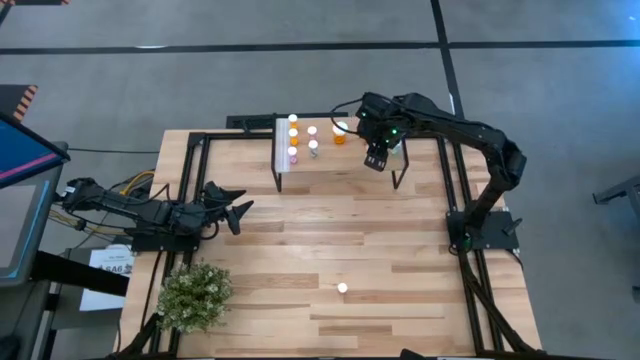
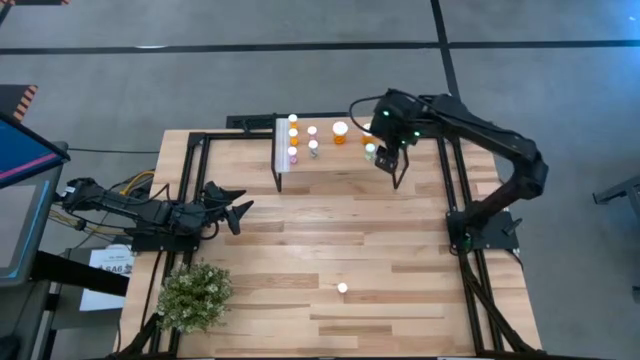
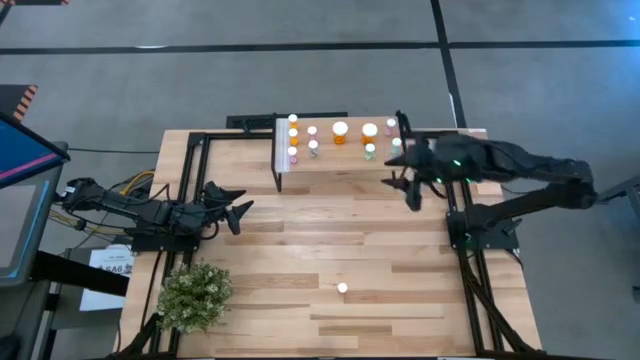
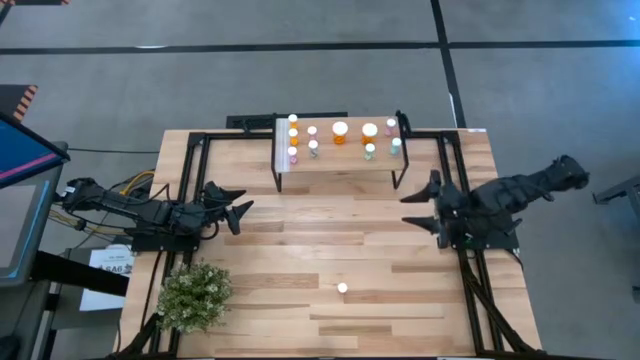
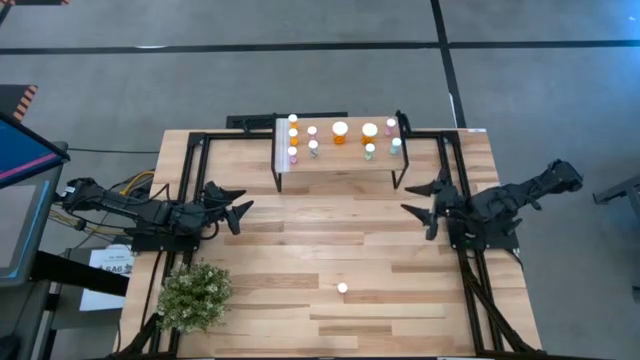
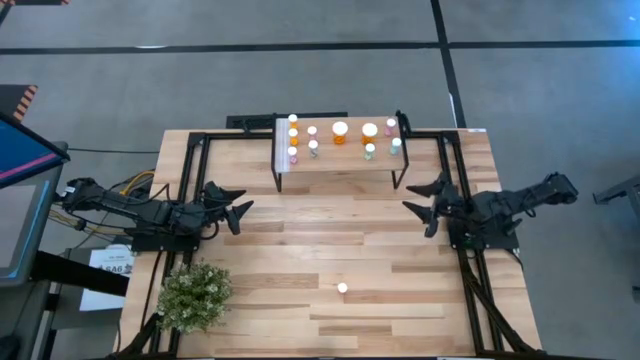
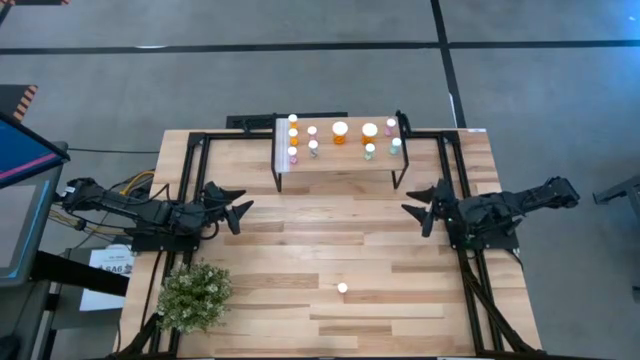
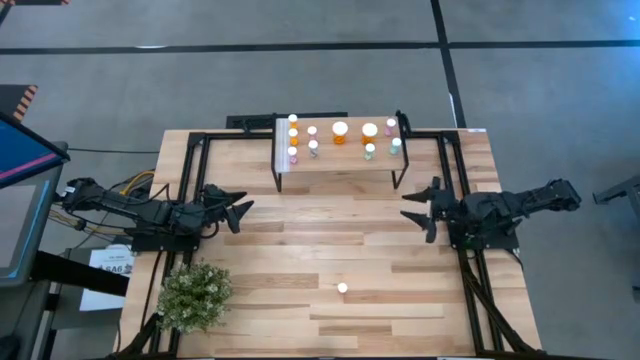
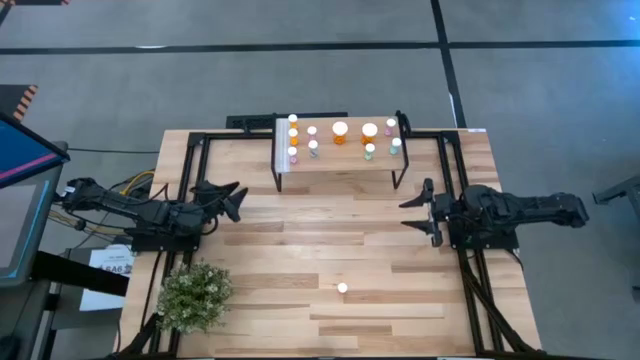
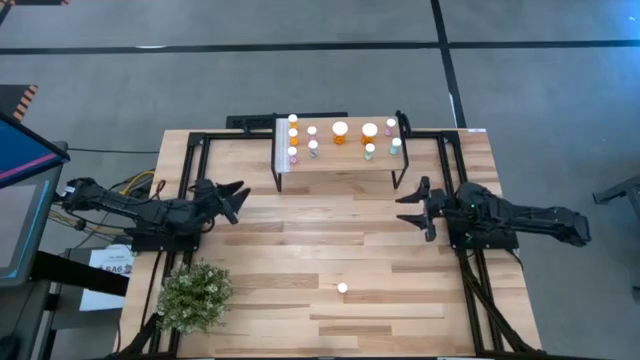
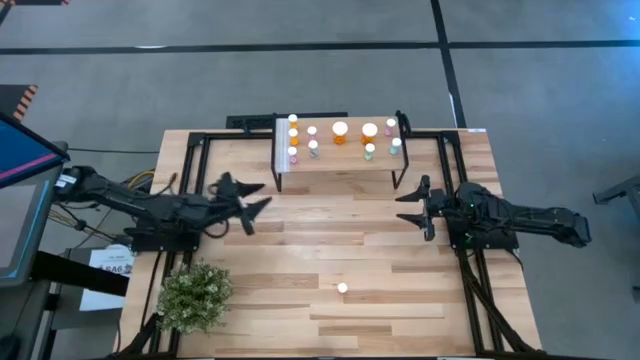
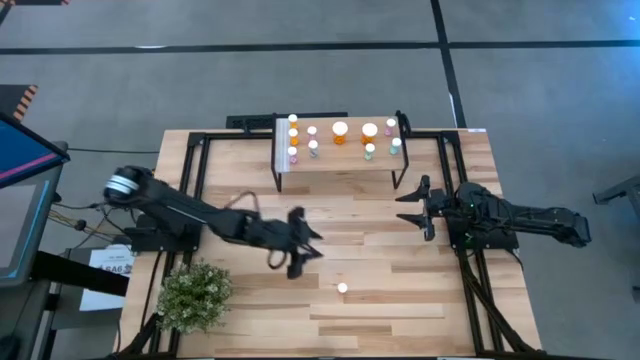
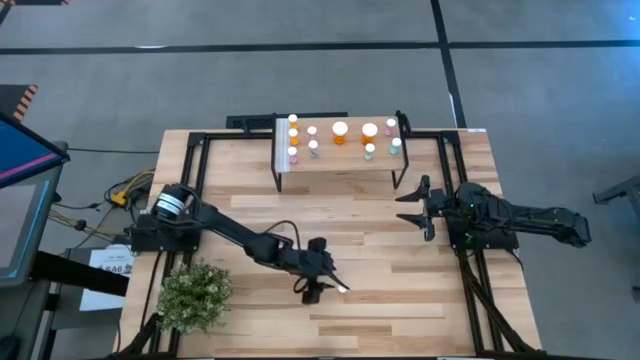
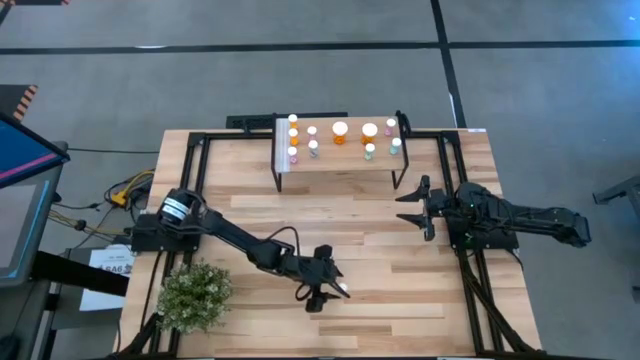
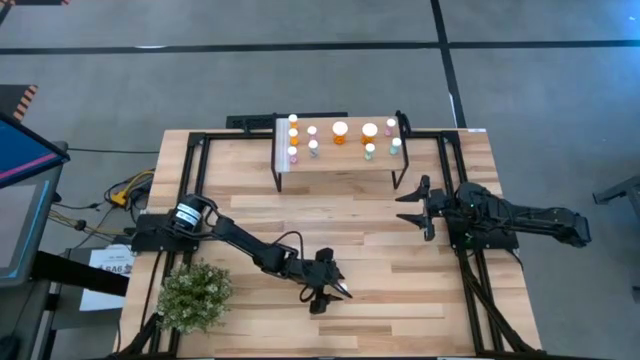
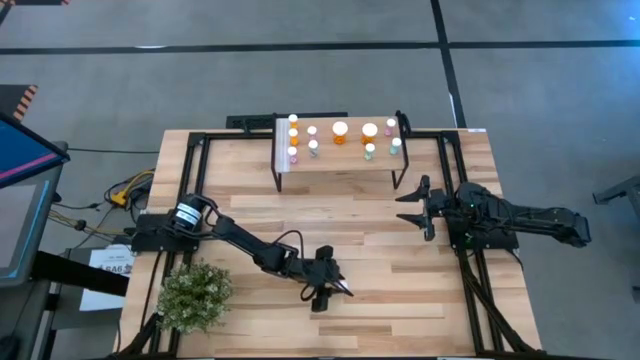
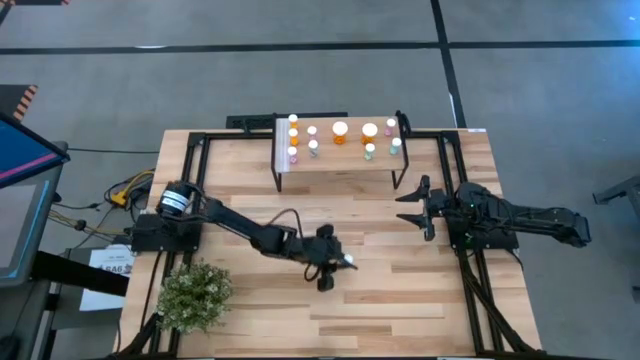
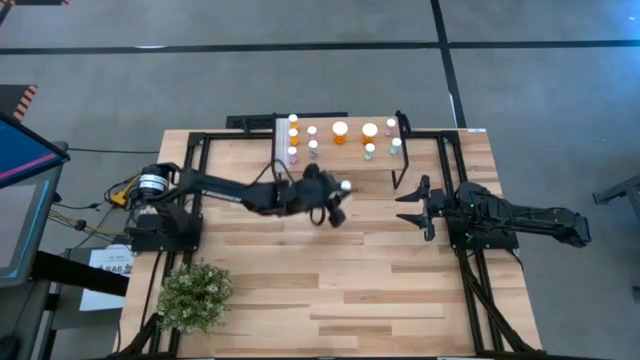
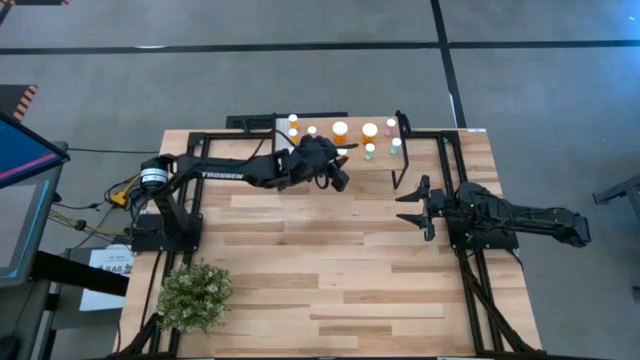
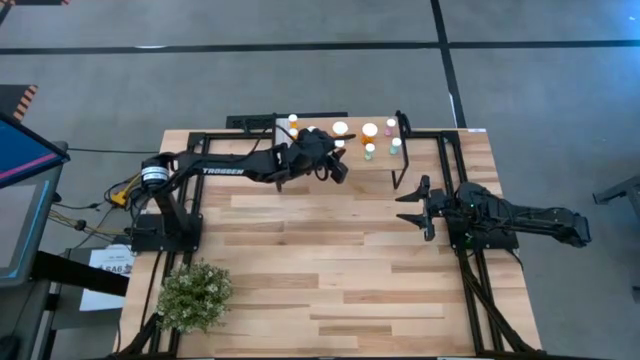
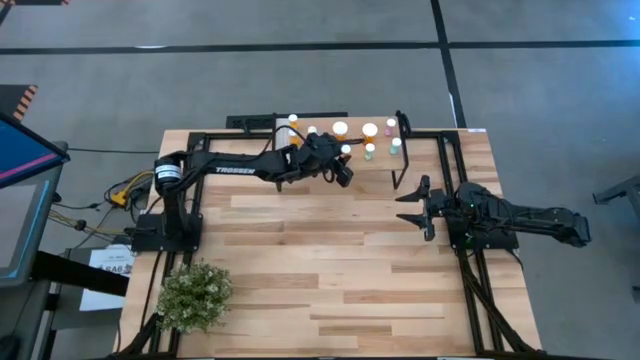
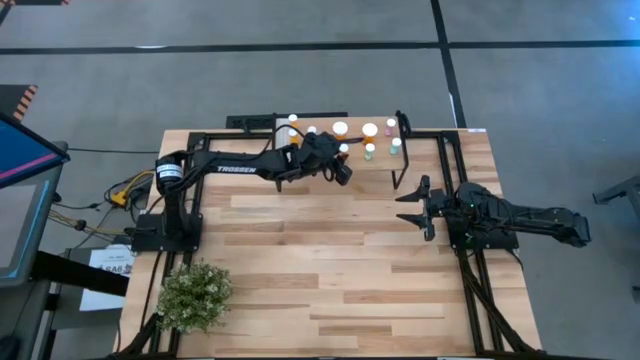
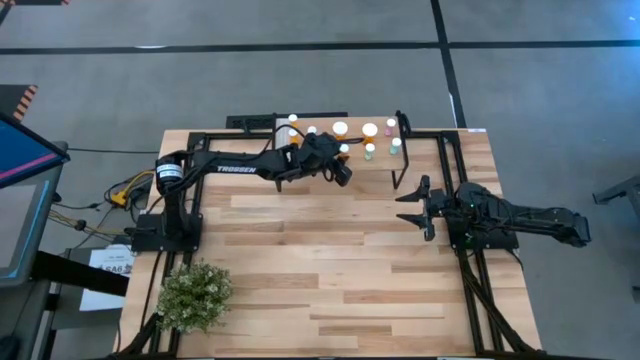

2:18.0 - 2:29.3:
Task: Pick and place medicine bottles onto shelf by color
Put the small orange pill bottle on the shelf

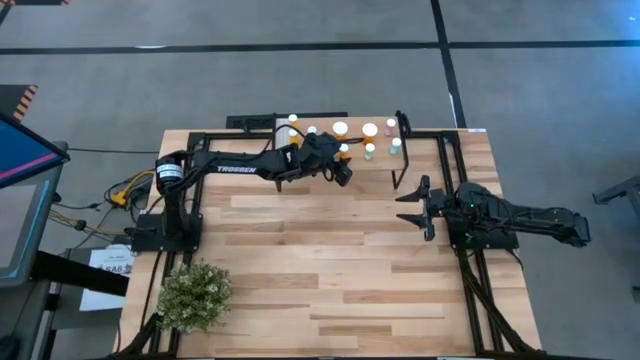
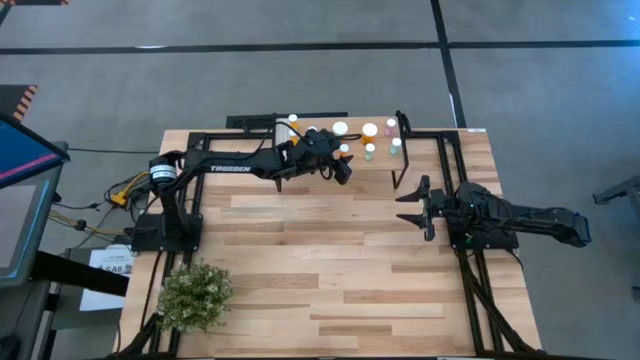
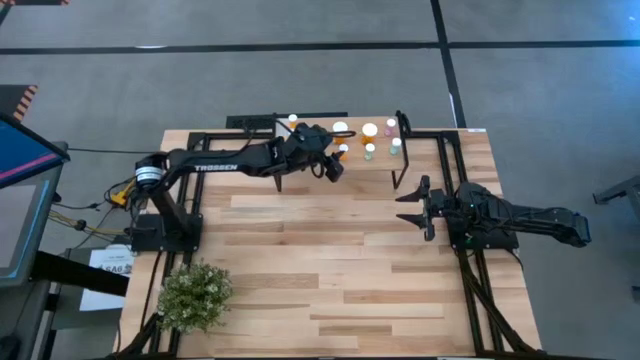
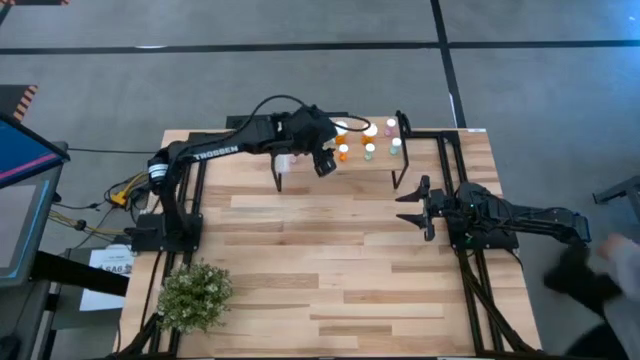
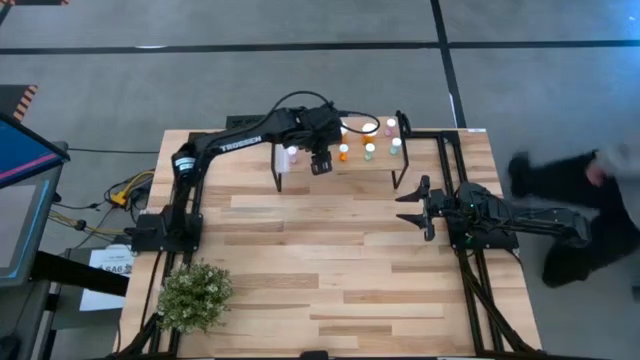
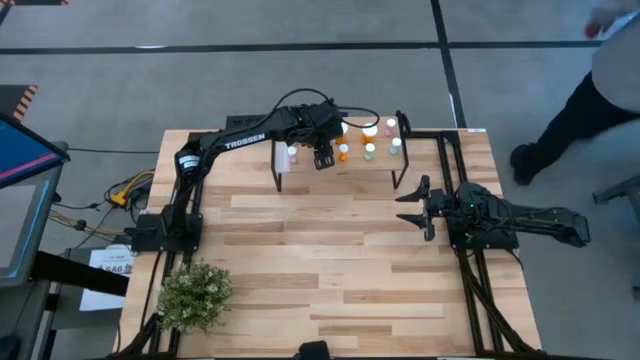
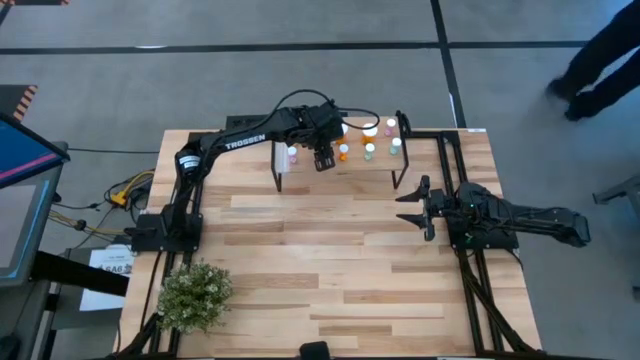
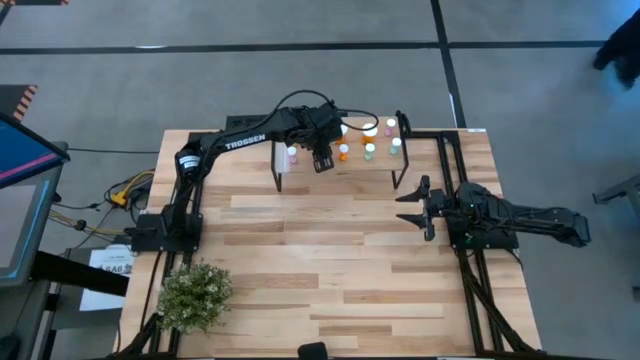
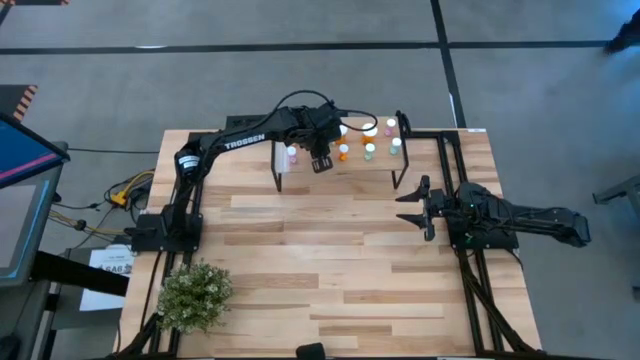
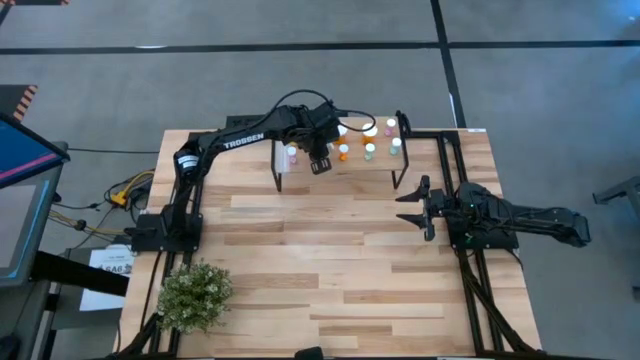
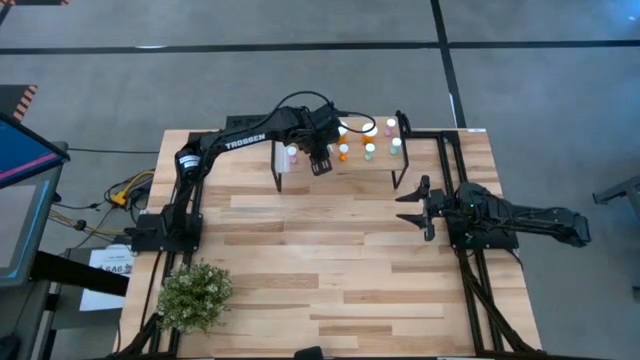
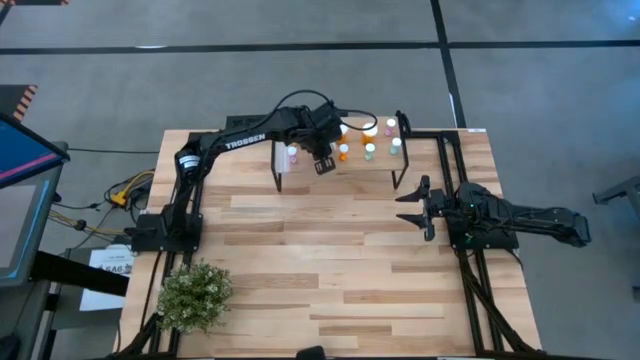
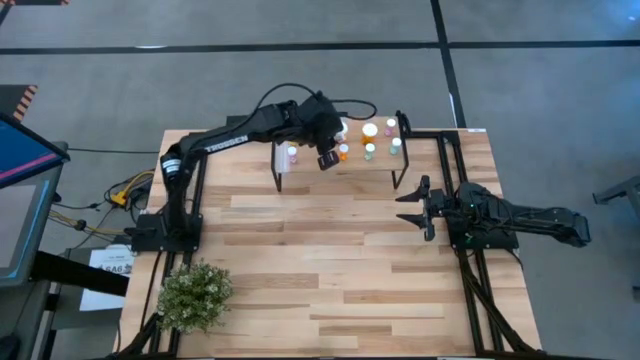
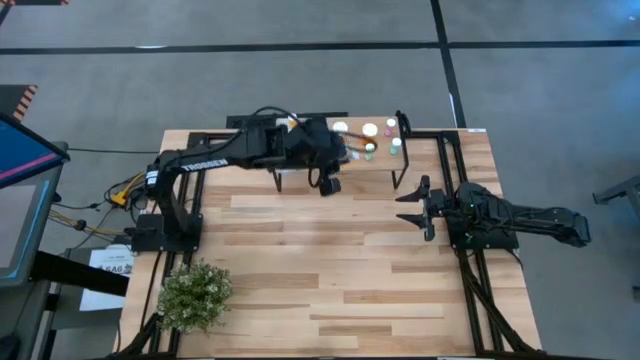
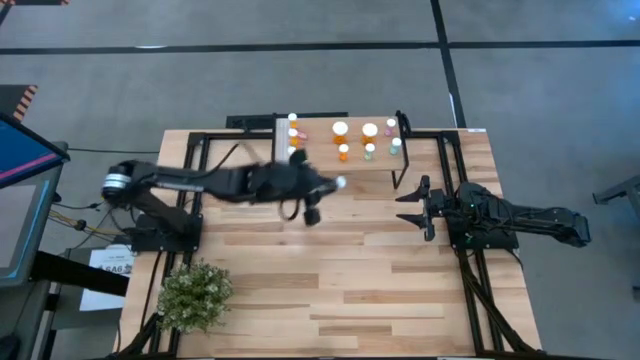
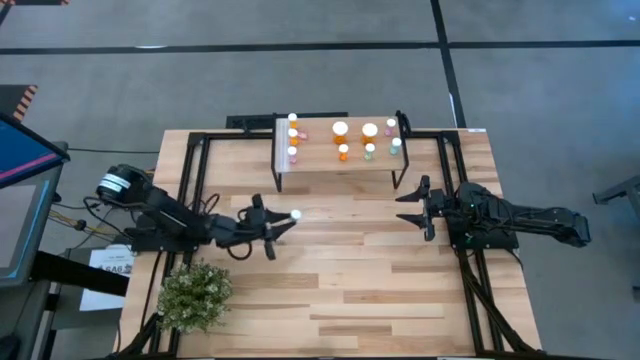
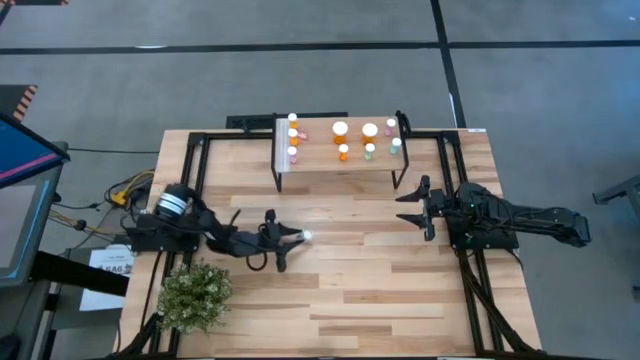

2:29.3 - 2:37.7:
Remove the small blue pill bottle from the shelf
